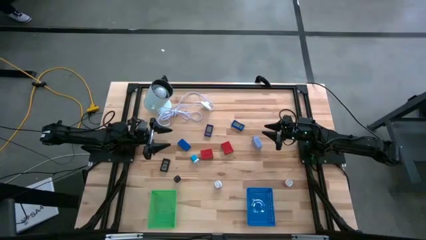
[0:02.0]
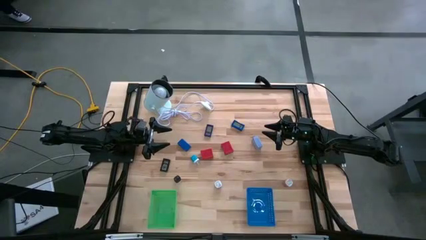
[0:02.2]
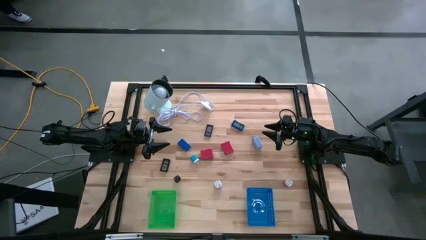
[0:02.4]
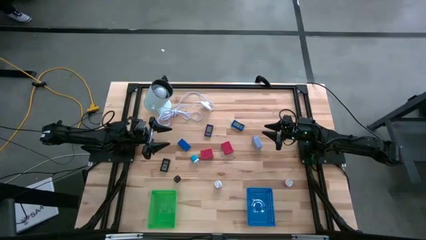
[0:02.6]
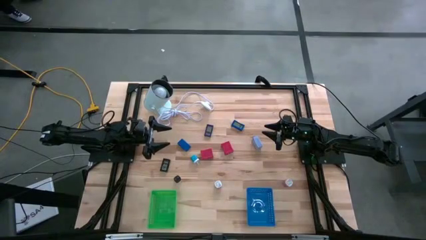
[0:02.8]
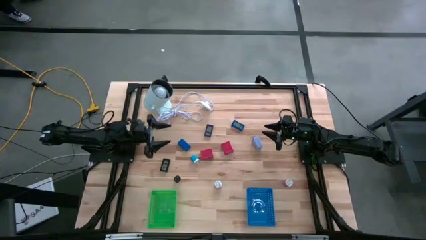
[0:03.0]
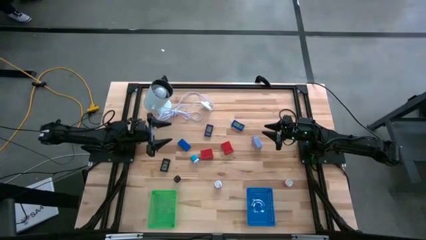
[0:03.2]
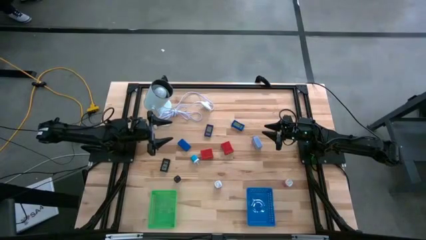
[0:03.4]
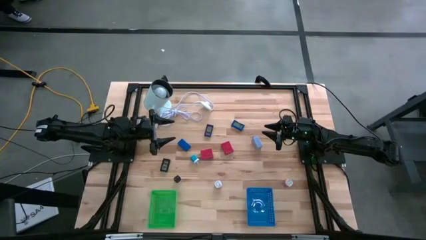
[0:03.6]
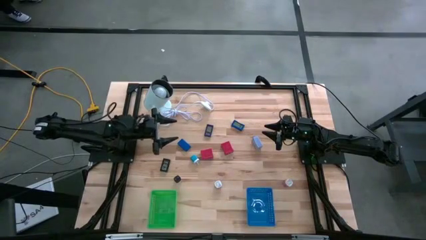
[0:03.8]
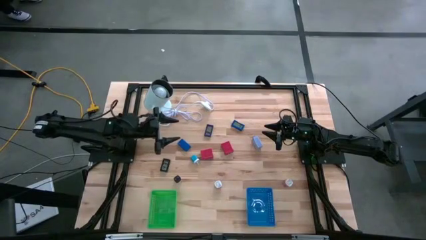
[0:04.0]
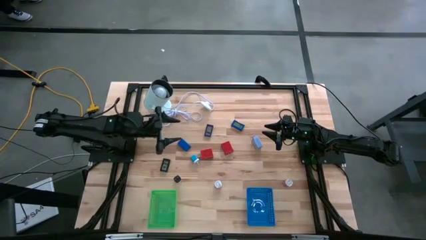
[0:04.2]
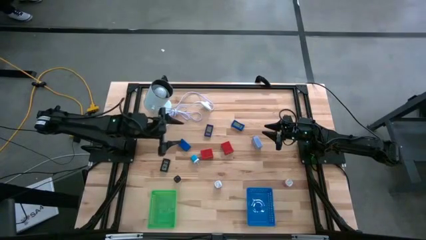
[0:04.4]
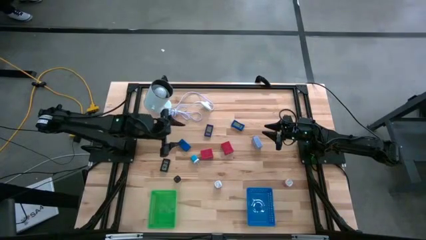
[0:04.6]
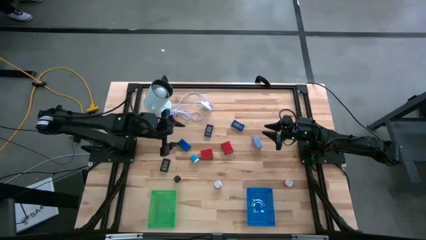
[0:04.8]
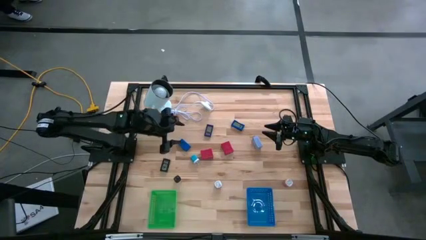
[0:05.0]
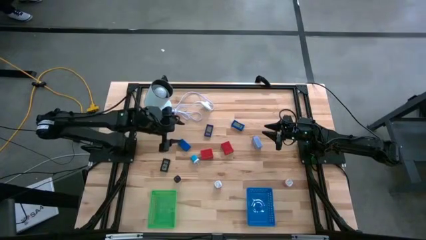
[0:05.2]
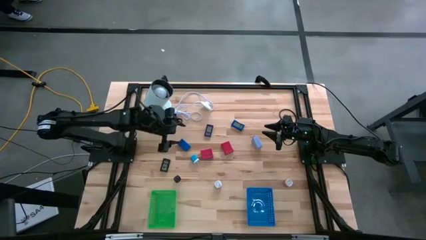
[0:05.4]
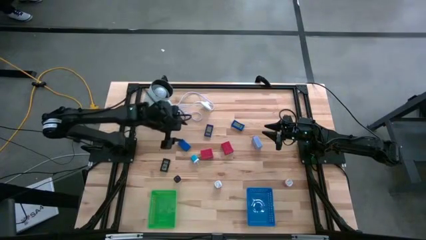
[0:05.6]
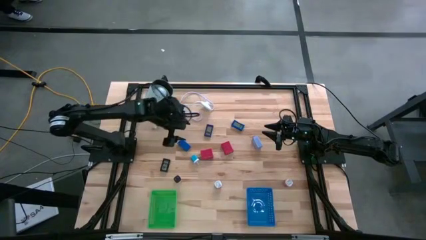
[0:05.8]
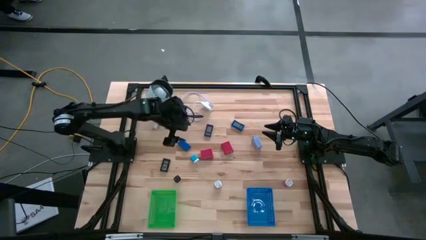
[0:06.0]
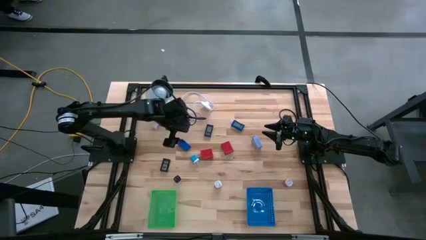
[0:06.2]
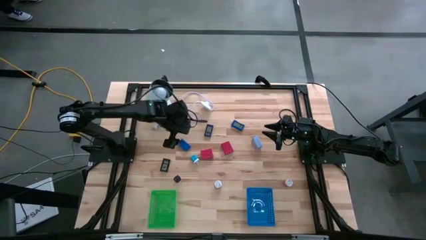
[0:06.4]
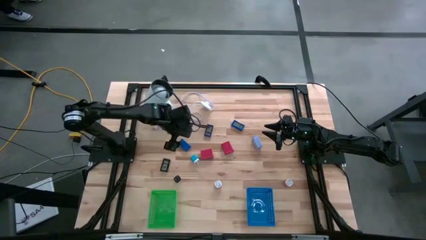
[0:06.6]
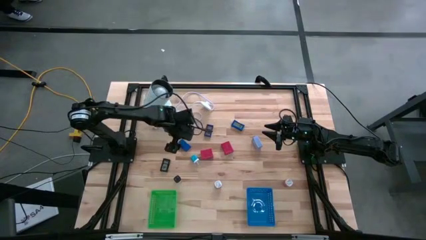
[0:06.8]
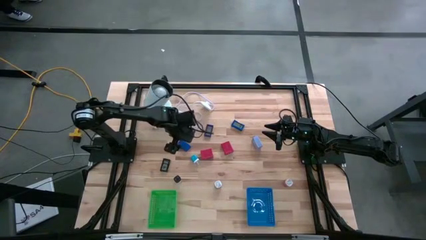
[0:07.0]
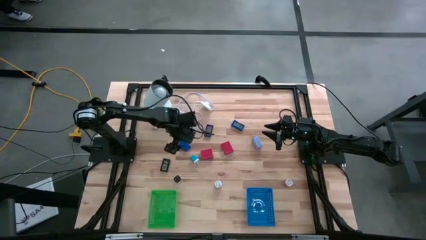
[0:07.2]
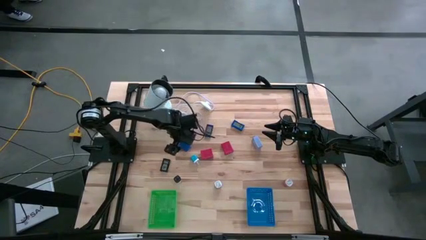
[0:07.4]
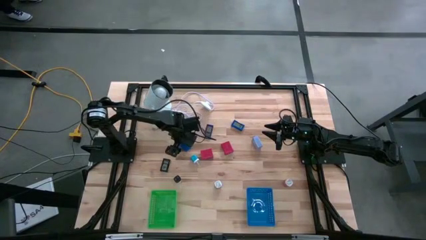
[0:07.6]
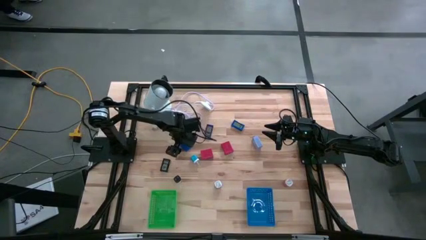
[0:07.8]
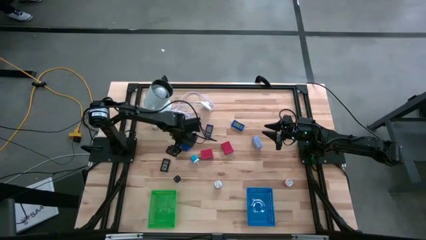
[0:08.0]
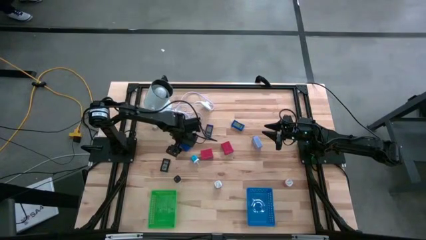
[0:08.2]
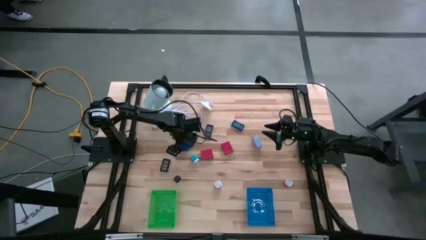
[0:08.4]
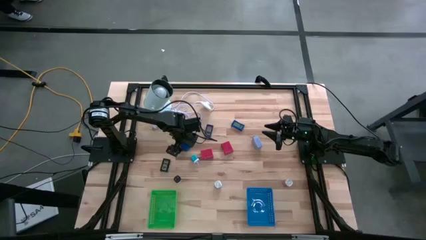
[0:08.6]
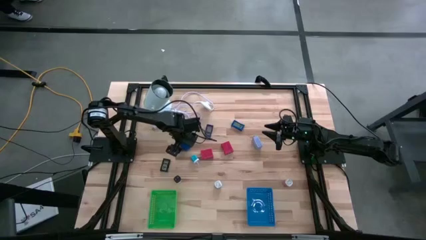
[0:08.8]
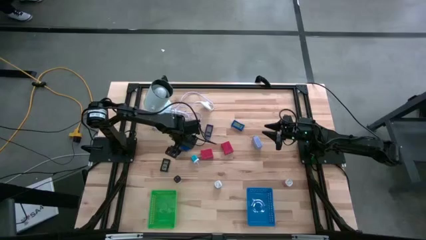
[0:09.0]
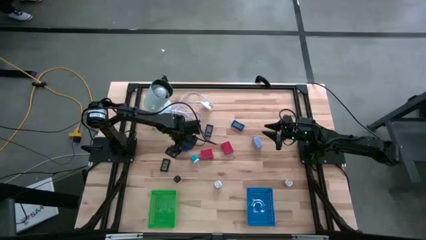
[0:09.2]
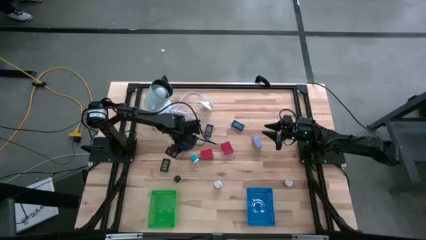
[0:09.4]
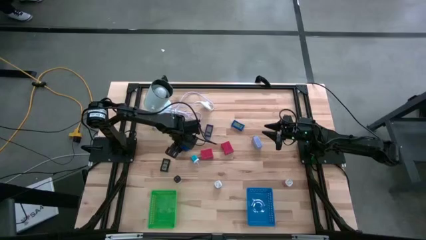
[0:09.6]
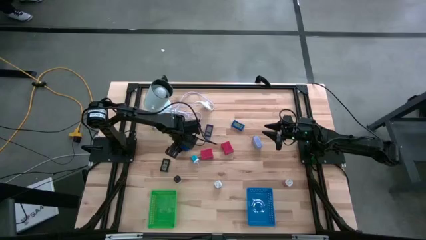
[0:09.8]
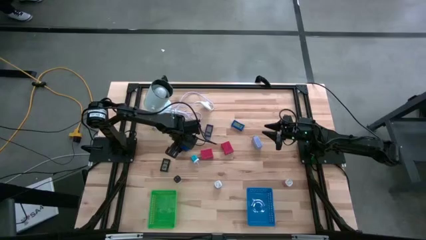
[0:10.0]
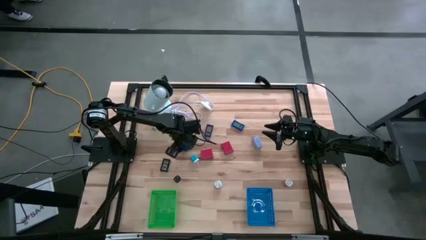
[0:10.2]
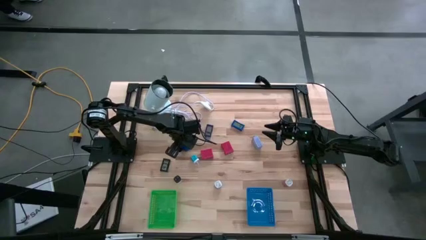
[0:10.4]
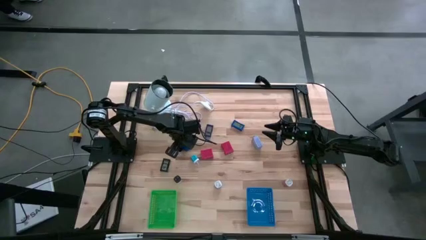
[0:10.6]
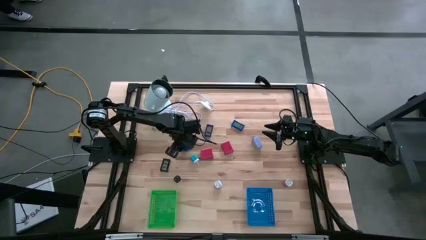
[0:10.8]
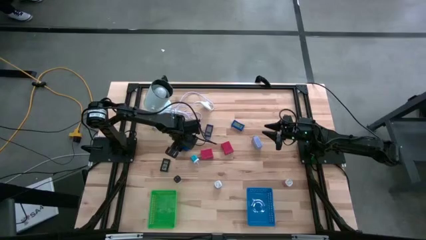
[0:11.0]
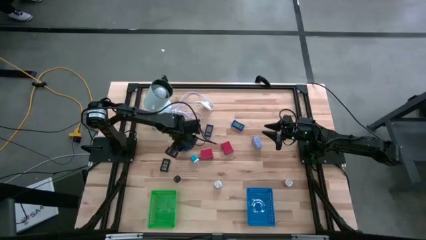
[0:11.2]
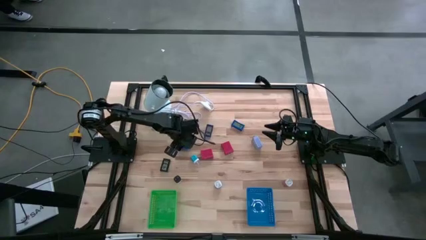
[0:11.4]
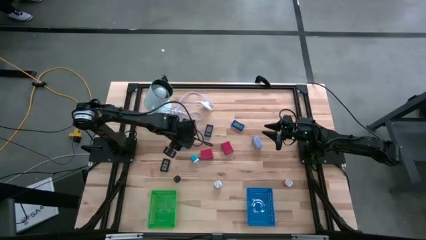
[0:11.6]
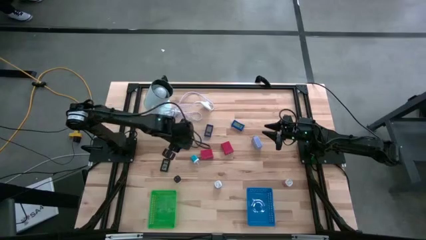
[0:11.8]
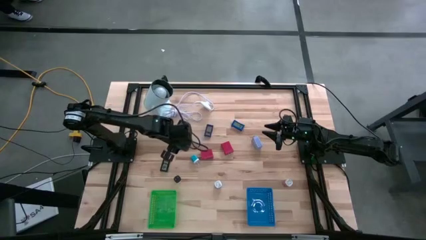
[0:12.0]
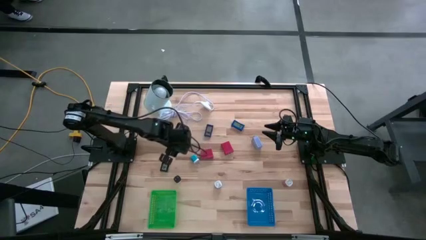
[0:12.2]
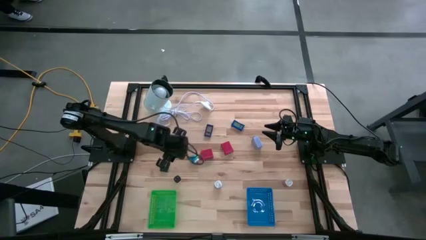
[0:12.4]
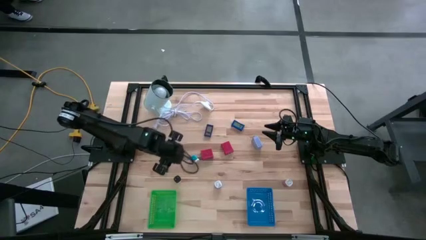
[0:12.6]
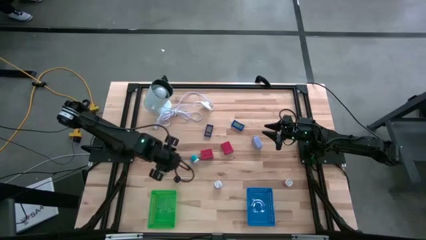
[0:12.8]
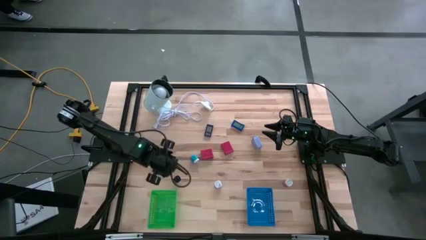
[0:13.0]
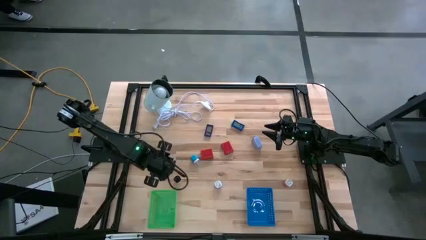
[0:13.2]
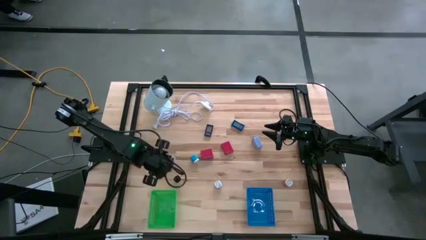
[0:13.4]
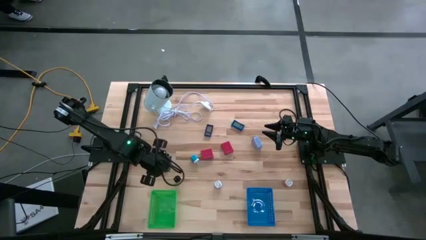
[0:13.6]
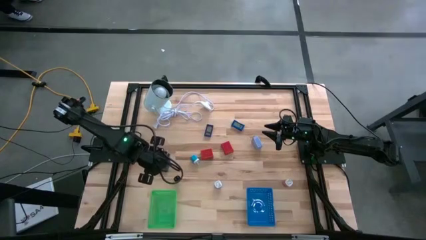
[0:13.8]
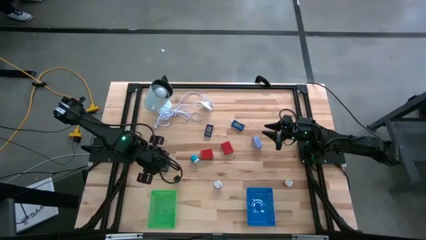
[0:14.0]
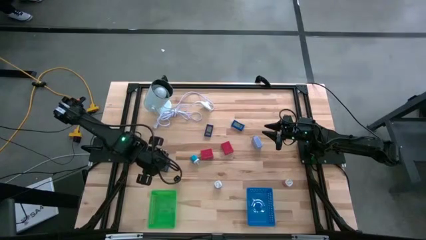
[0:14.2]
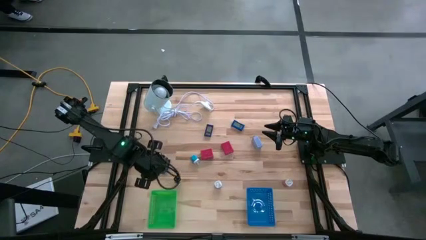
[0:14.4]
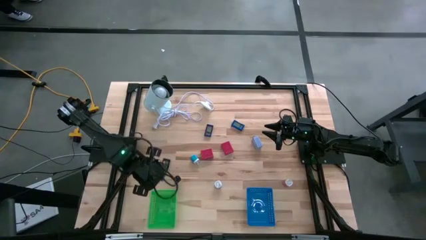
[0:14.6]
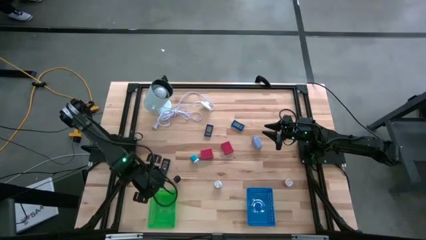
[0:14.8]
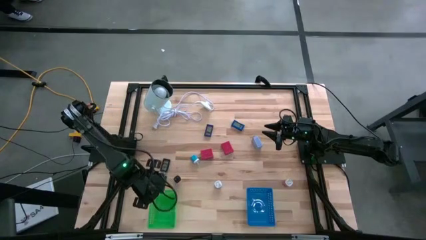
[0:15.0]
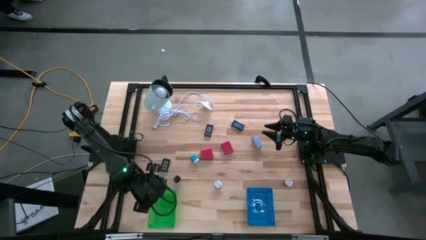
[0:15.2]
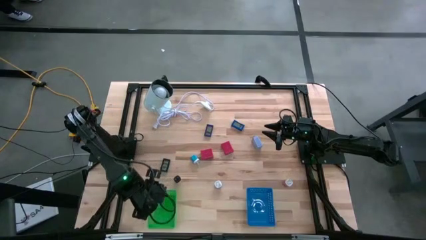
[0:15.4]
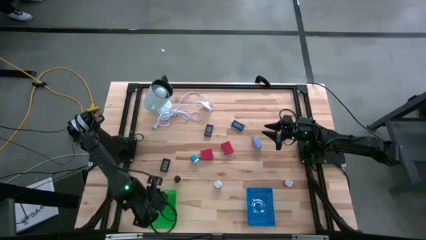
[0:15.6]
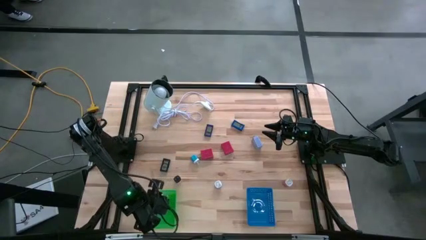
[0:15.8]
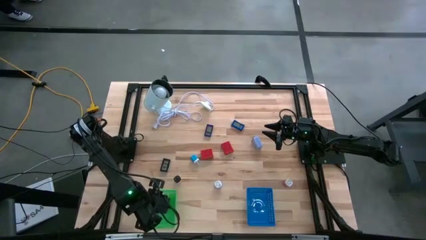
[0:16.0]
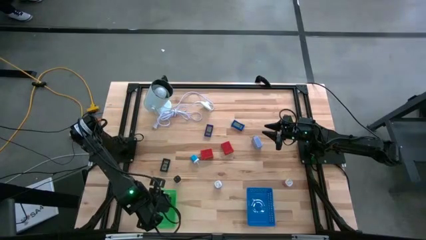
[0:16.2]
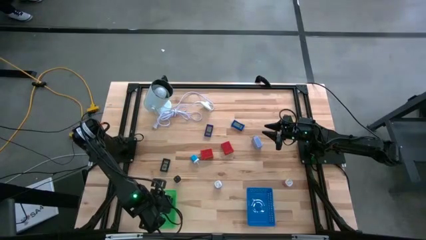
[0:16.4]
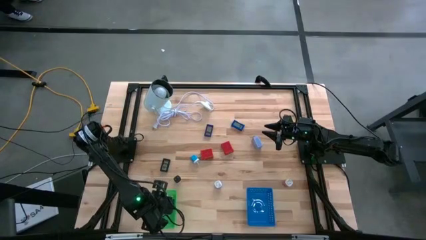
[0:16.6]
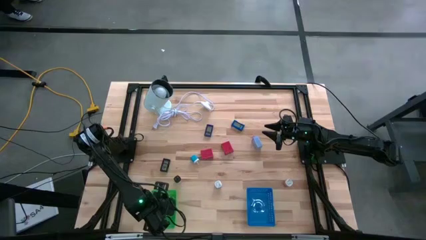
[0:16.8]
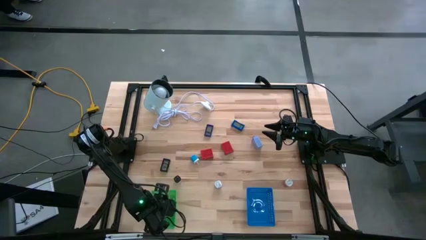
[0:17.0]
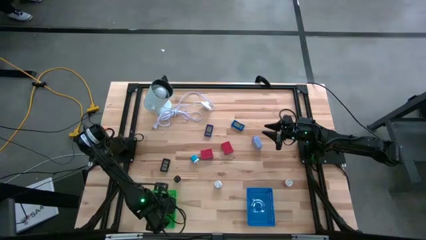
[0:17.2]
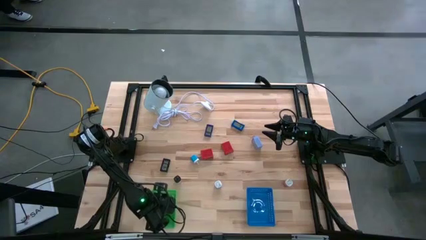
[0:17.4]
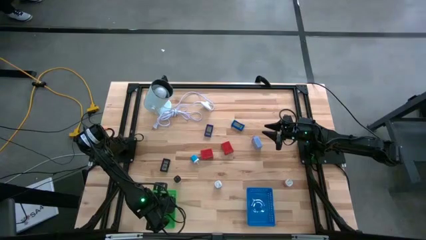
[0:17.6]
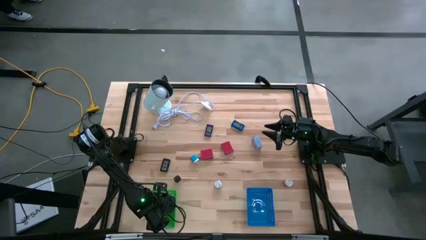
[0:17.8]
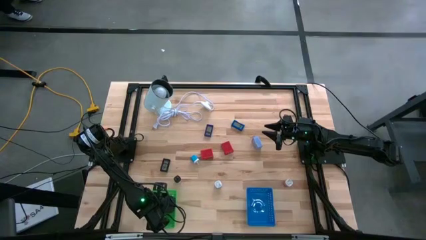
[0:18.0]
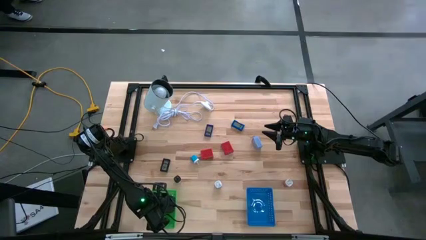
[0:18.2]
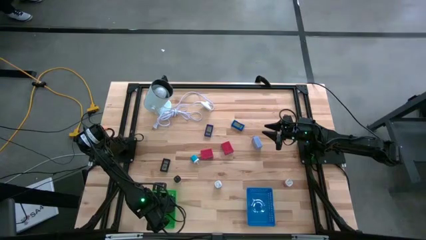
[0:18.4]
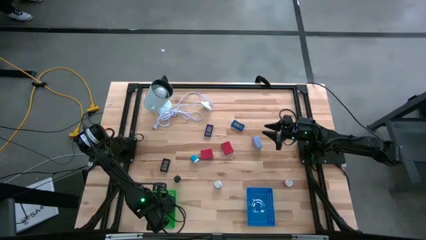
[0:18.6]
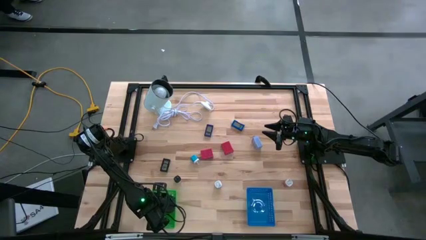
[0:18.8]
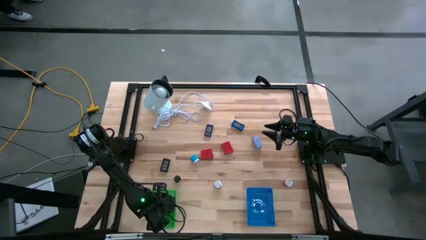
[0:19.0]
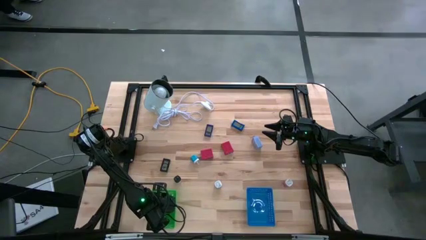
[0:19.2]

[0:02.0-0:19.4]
Task: Pick & Place Office items
Put the left blue digital clock into the green bin
